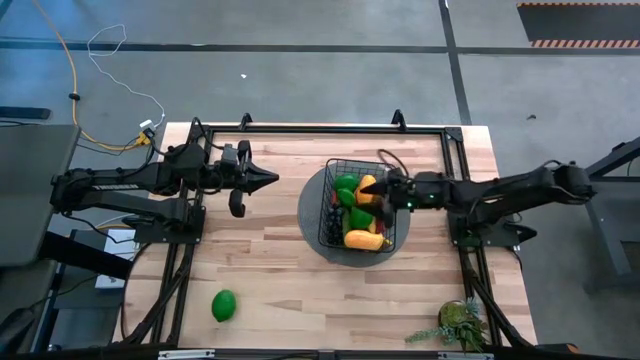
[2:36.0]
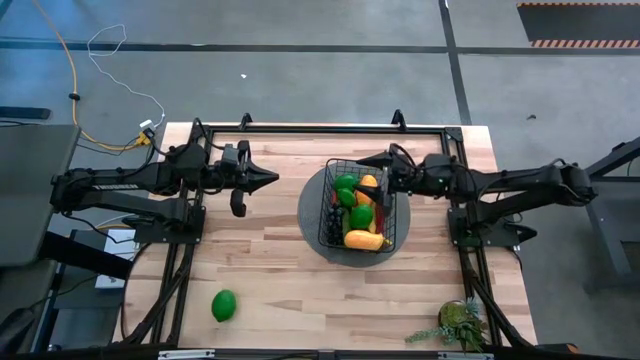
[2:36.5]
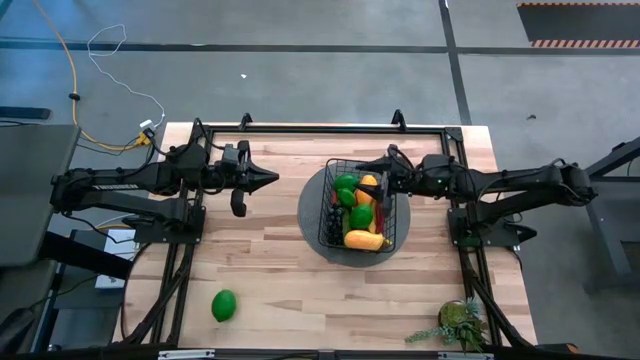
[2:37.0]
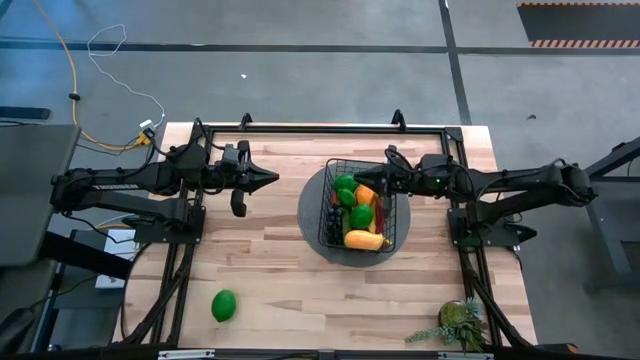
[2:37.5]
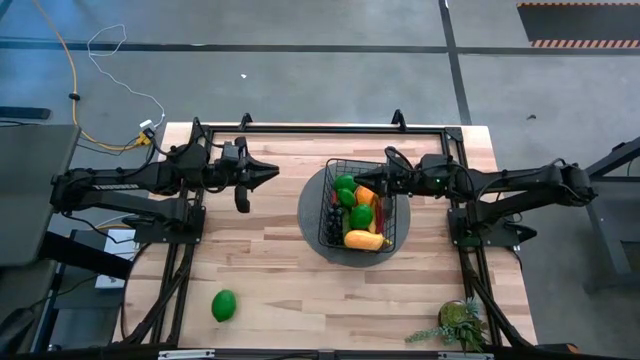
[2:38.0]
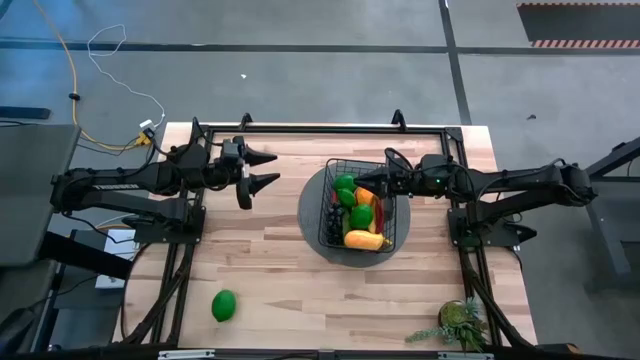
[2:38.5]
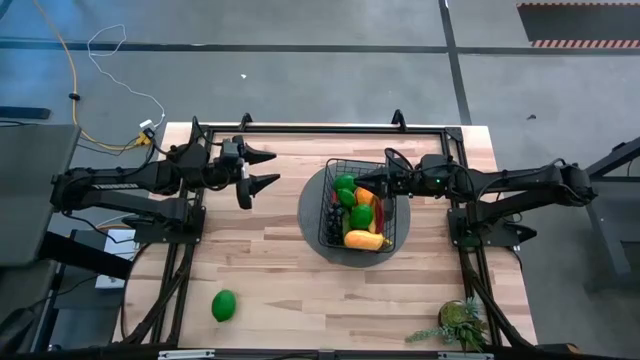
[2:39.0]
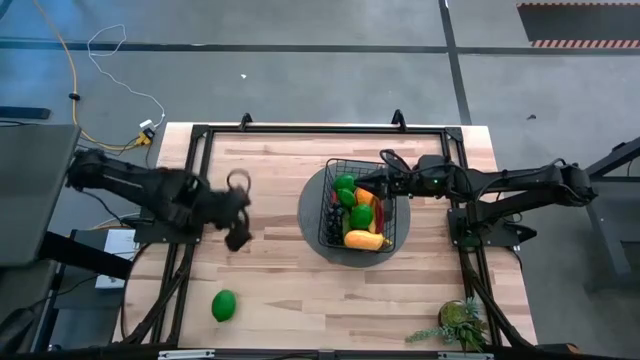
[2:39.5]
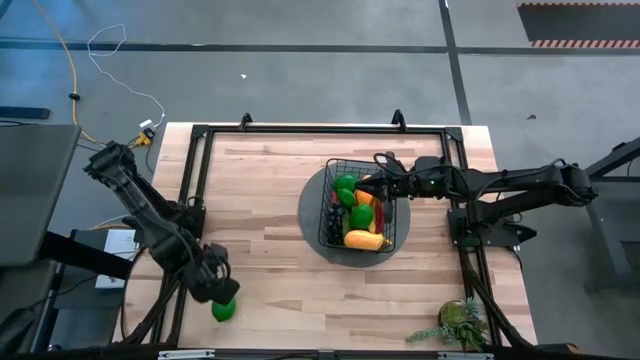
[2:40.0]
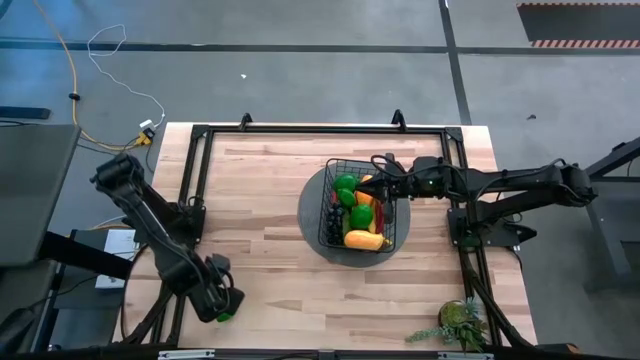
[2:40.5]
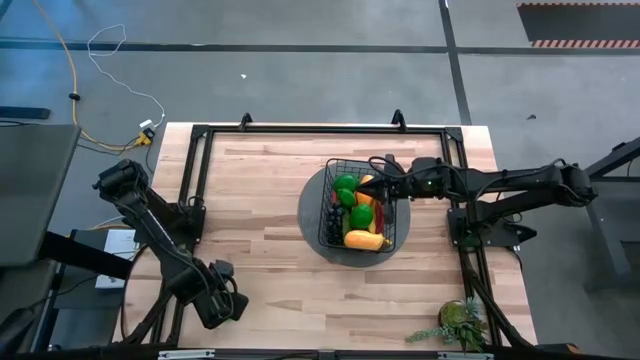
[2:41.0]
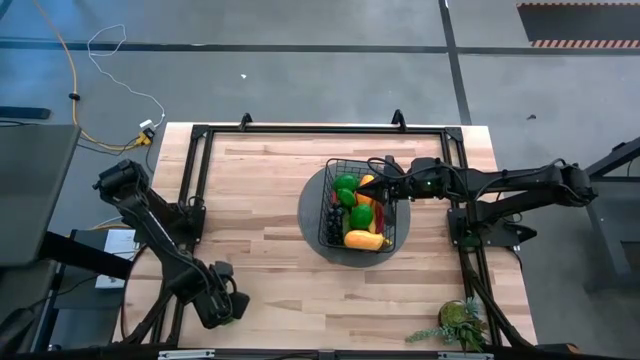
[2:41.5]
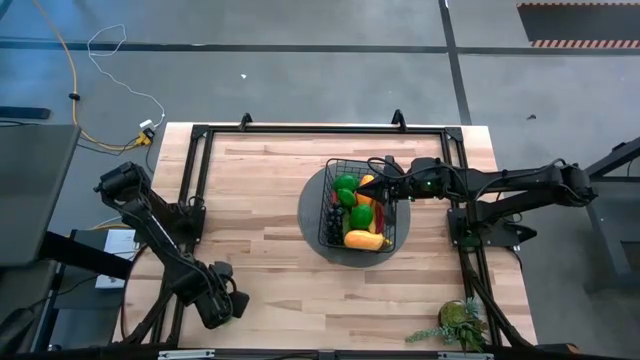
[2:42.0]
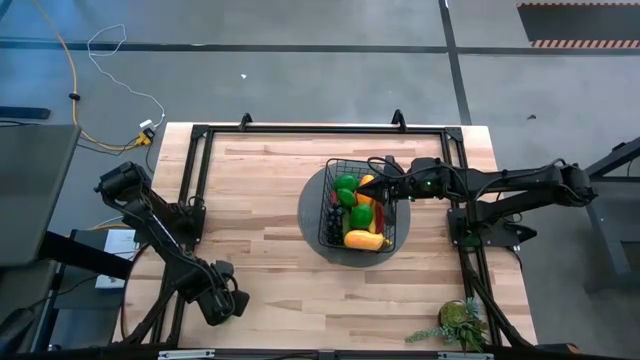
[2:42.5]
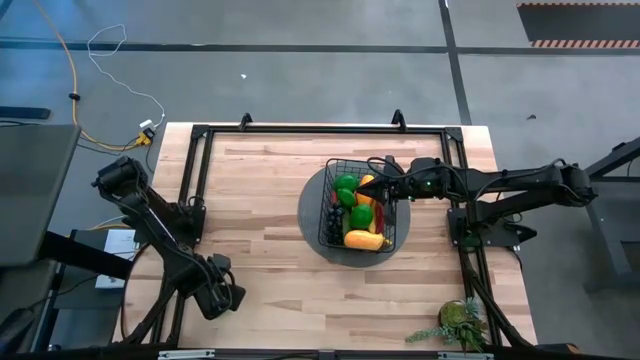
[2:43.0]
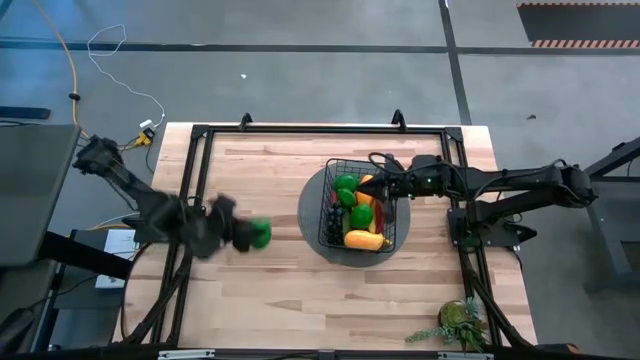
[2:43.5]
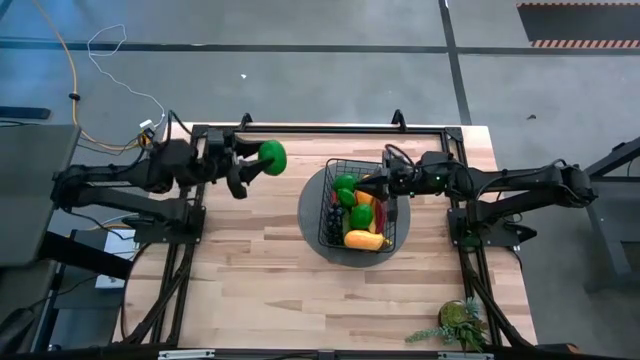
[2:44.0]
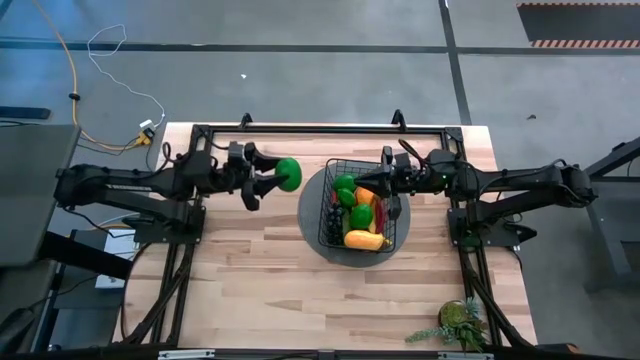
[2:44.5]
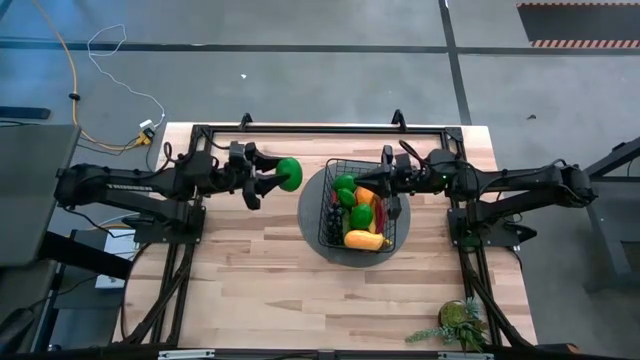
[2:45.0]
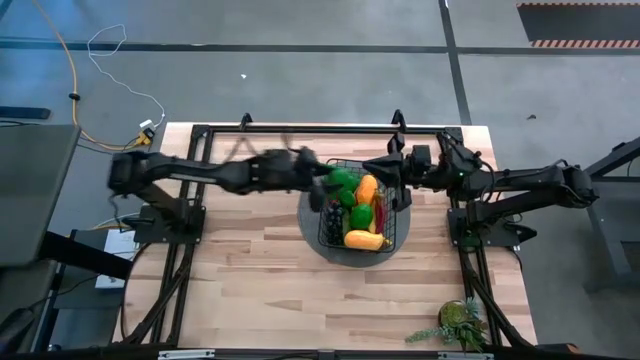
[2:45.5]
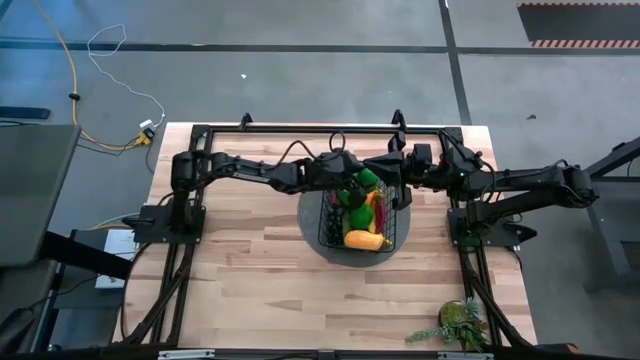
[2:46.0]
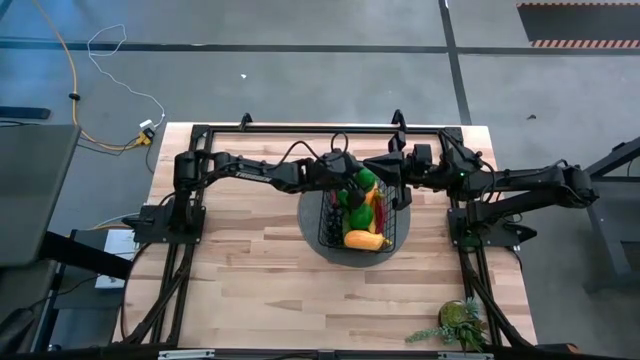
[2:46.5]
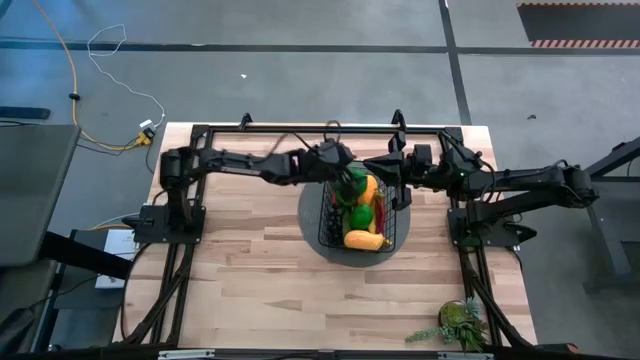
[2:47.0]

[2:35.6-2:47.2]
Task: Build produce basket
Put the green lime into the black wire basket

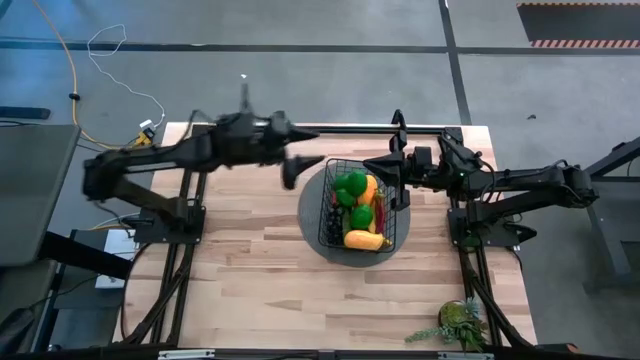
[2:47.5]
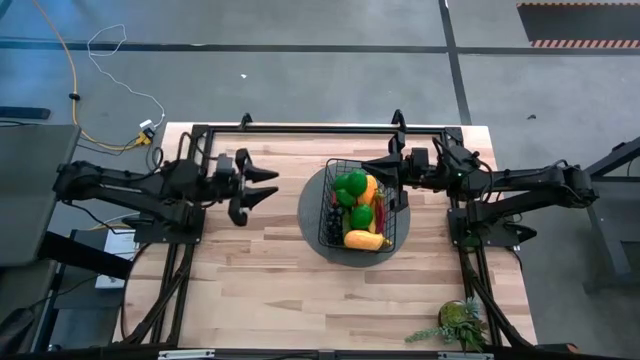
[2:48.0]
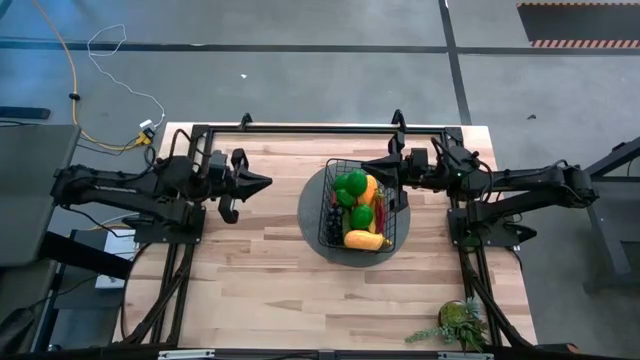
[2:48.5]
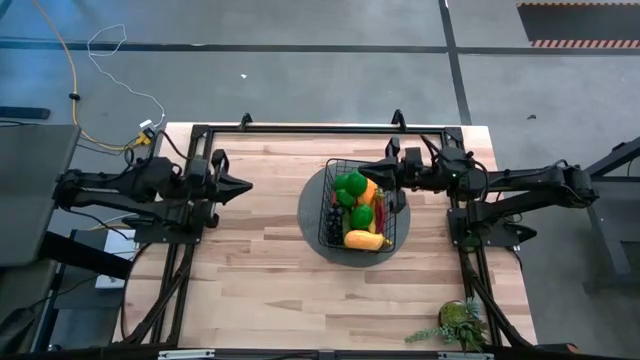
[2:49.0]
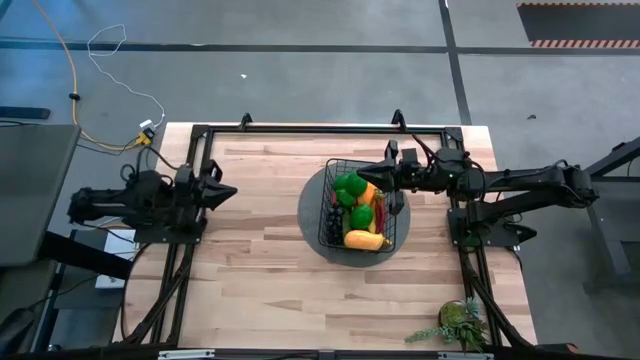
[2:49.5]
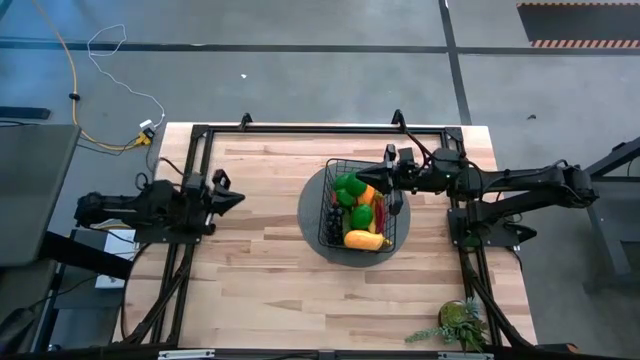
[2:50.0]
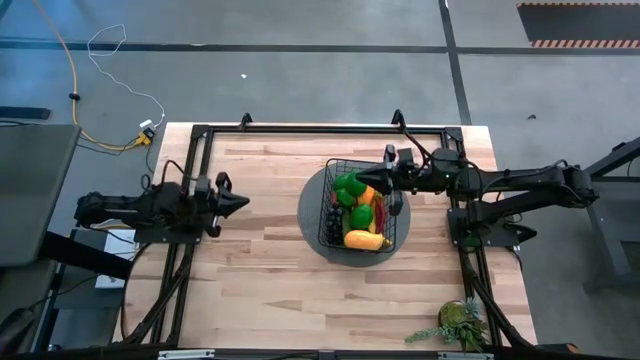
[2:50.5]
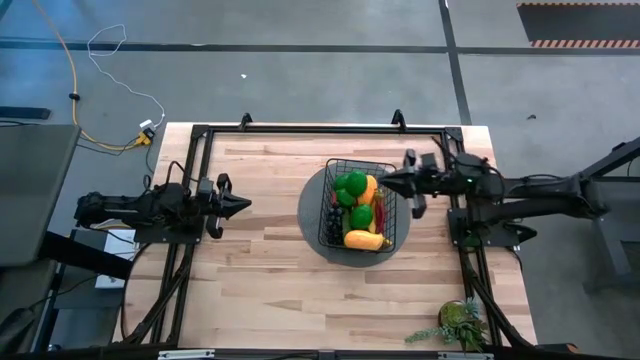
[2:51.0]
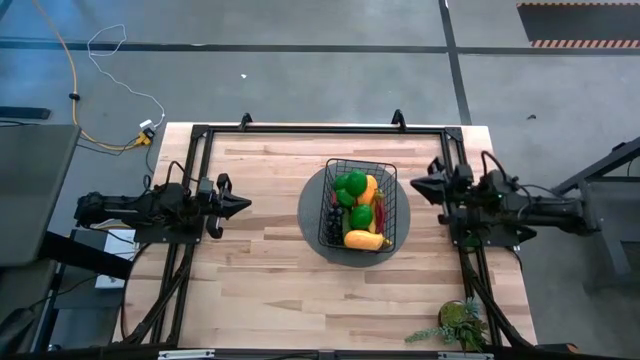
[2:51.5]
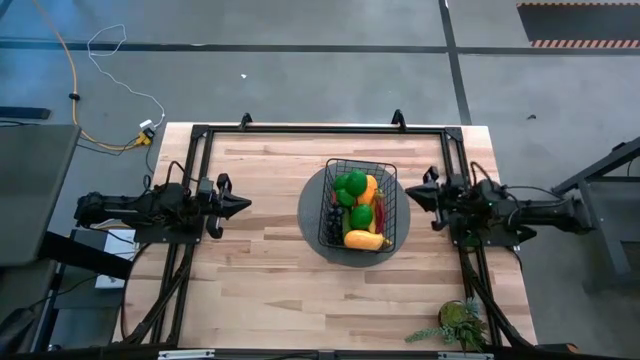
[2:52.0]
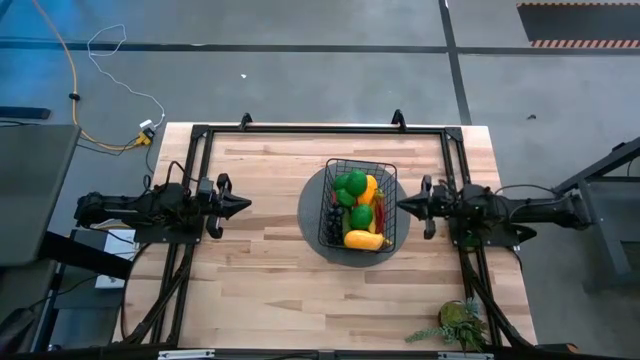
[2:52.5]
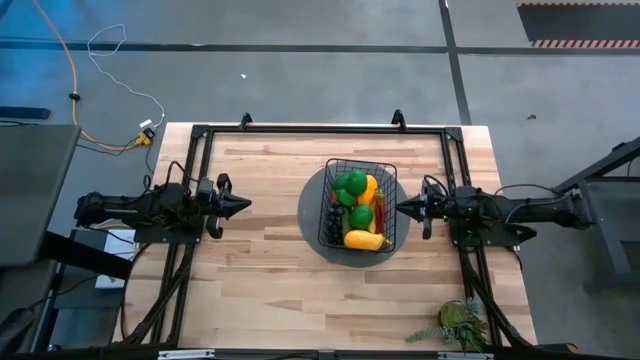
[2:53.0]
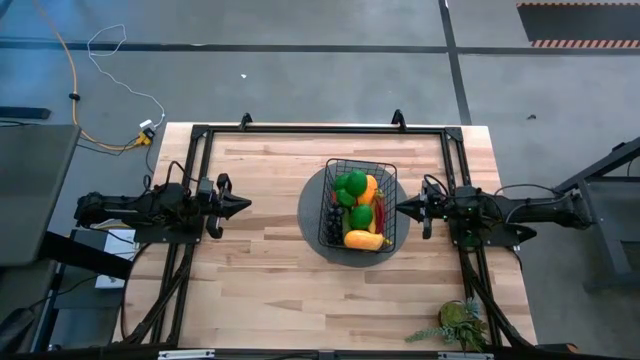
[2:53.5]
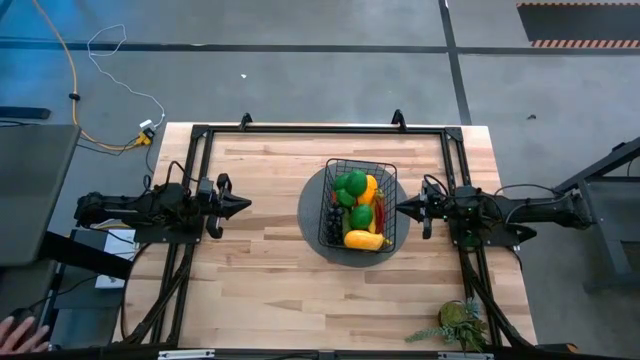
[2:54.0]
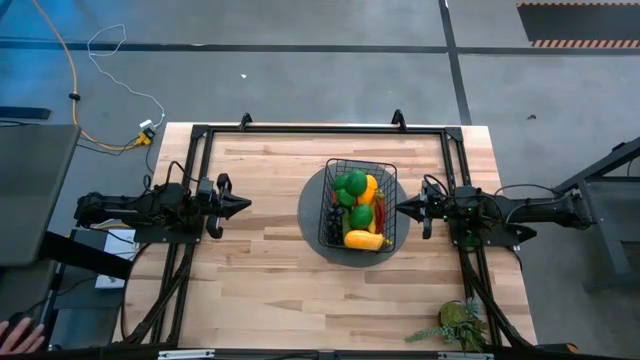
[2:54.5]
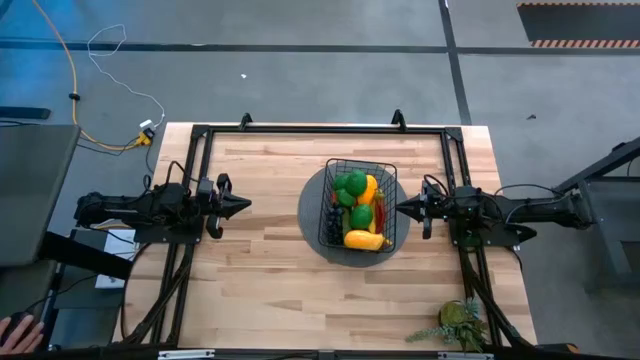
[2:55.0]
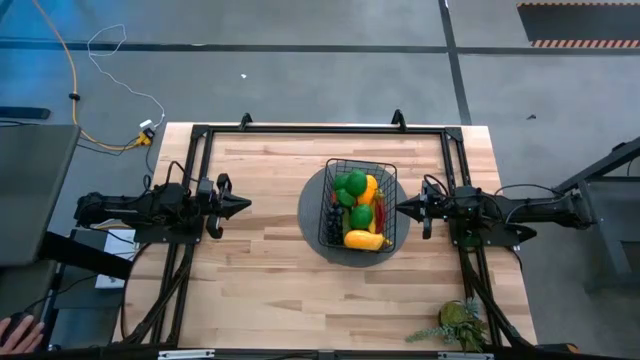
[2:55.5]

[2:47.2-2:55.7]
Return to Home Position
